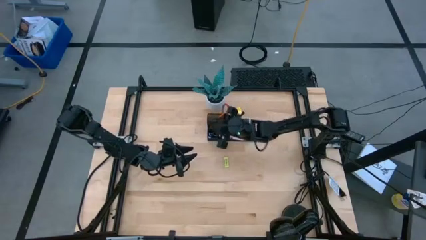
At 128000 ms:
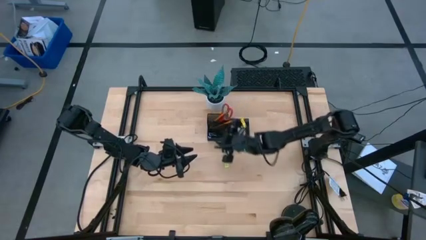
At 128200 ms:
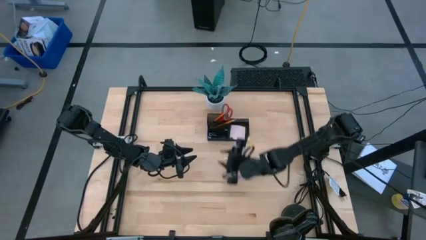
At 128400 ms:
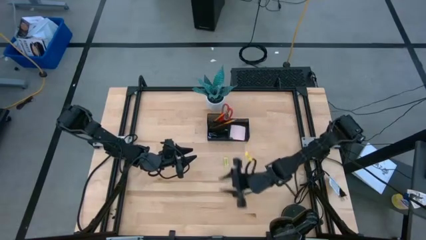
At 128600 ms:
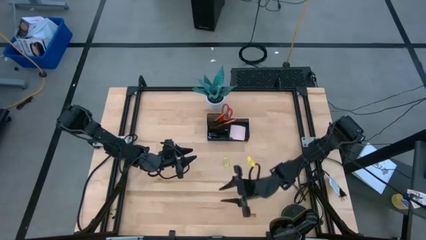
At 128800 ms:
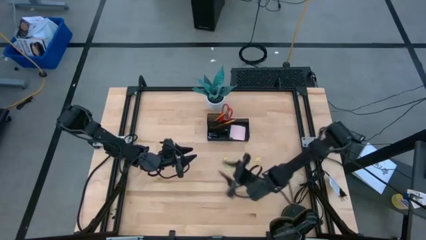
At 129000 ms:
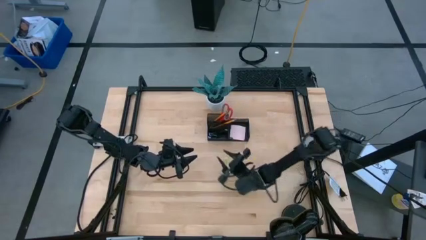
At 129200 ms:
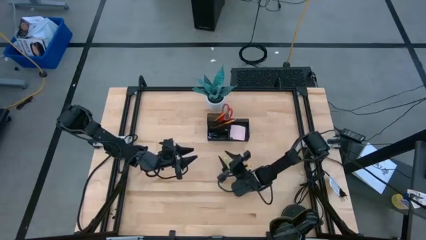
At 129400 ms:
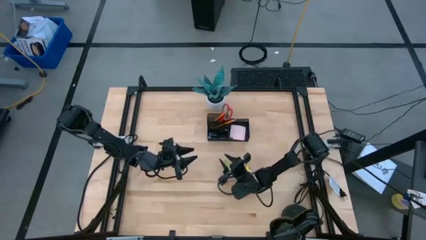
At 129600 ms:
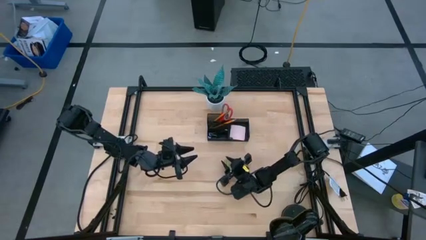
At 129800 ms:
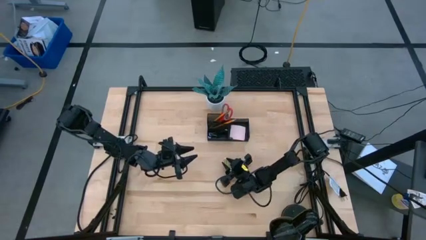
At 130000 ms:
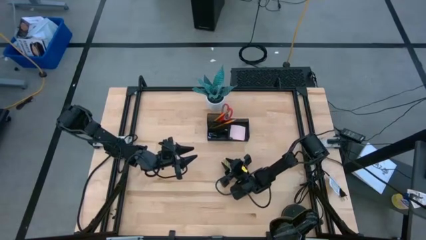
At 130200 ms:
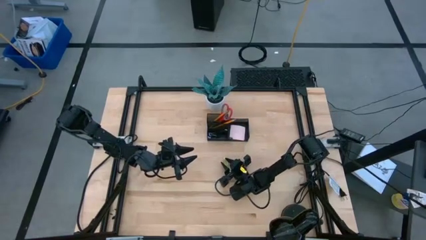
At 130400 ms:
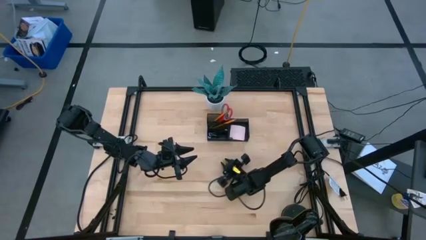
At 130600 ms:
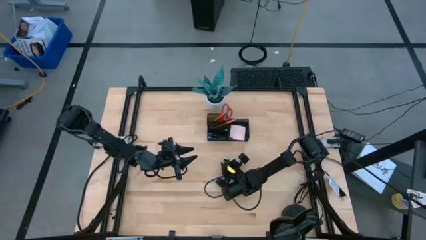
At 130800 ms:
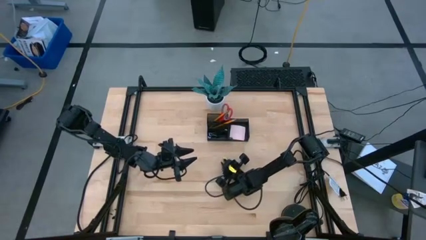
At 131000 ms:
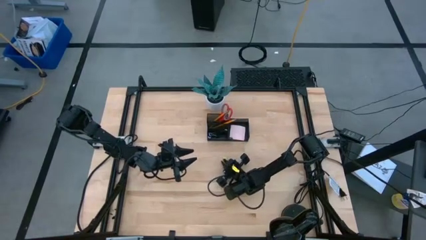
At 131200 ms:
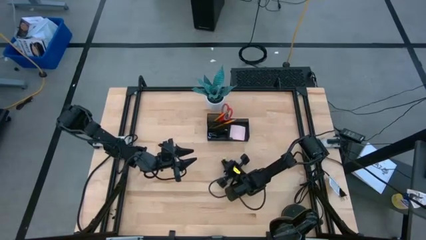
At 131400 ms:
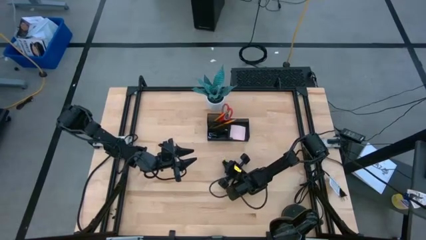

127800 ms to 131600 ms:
Task: Pick and place office supplies into organizer
Put the green eraser into the mesh black desk organizer

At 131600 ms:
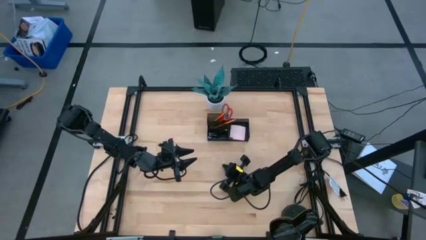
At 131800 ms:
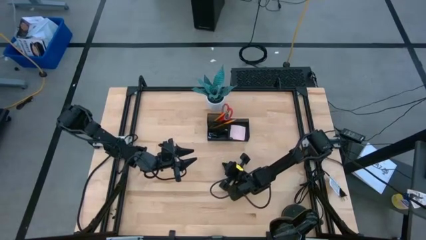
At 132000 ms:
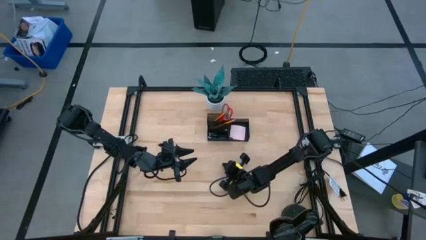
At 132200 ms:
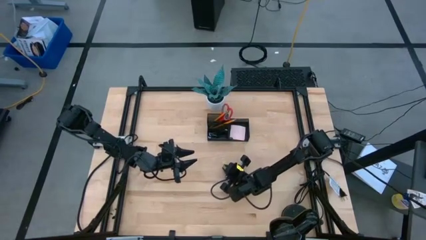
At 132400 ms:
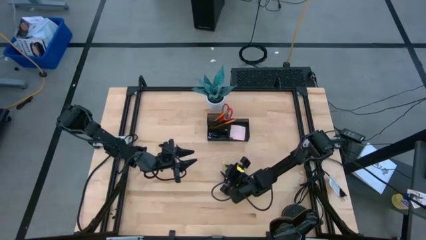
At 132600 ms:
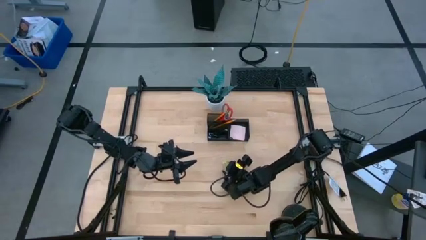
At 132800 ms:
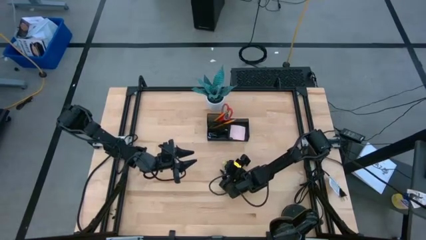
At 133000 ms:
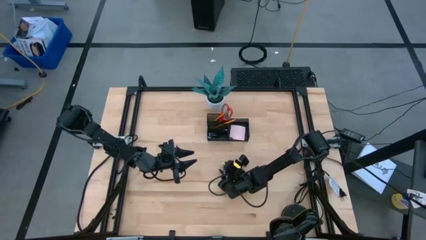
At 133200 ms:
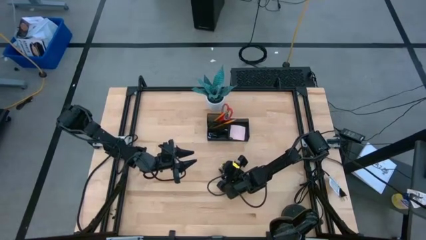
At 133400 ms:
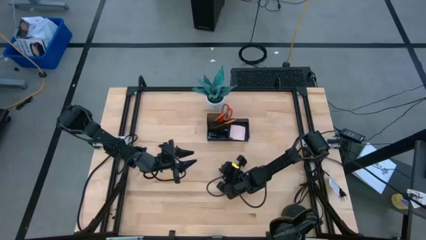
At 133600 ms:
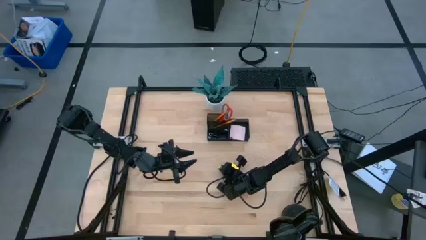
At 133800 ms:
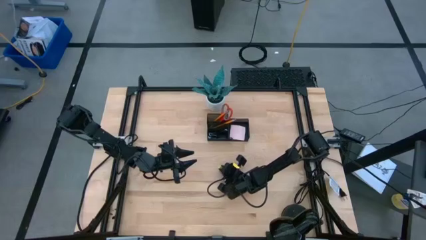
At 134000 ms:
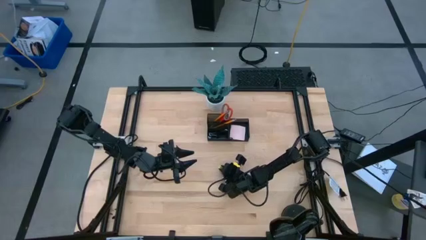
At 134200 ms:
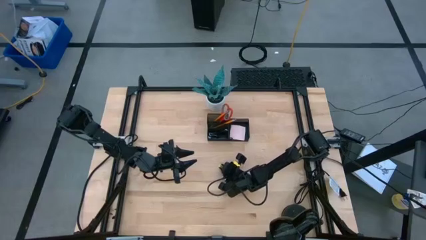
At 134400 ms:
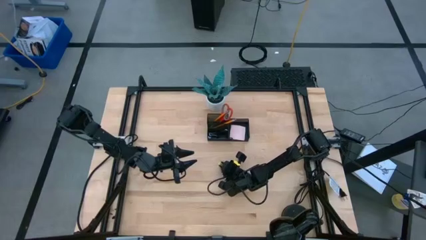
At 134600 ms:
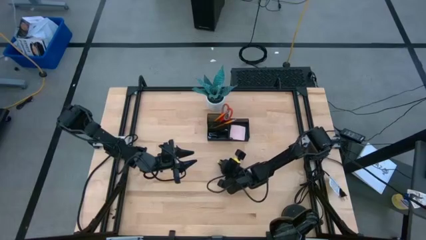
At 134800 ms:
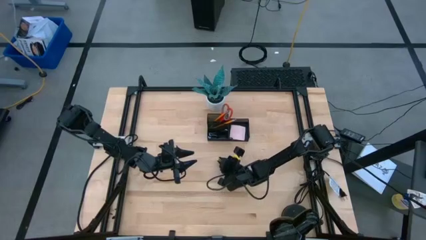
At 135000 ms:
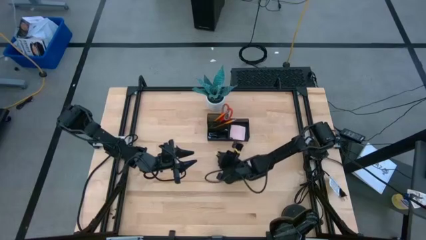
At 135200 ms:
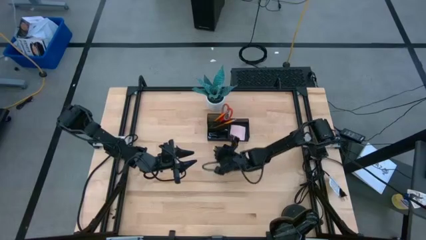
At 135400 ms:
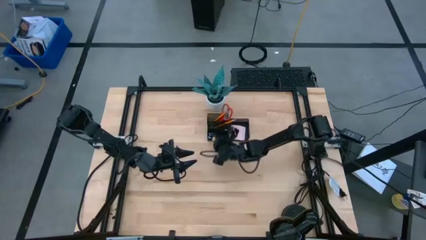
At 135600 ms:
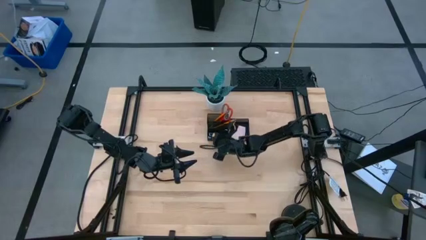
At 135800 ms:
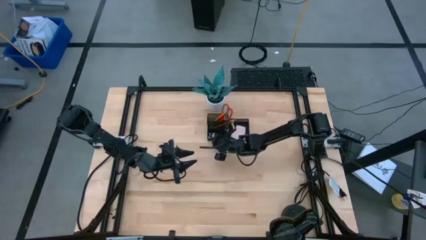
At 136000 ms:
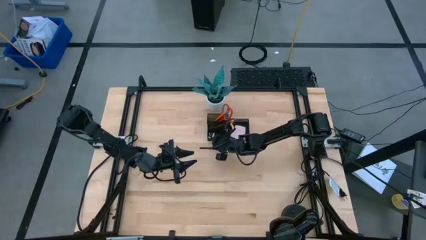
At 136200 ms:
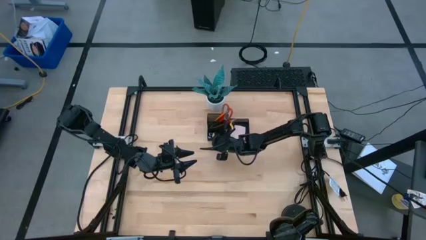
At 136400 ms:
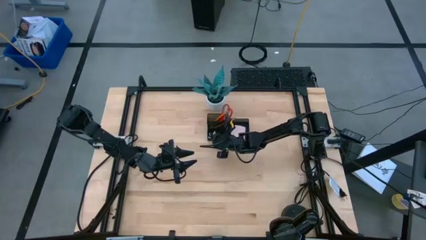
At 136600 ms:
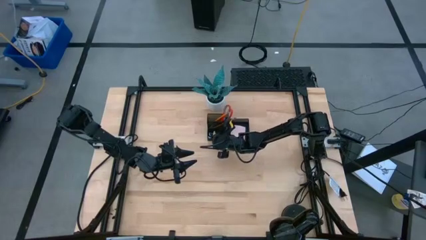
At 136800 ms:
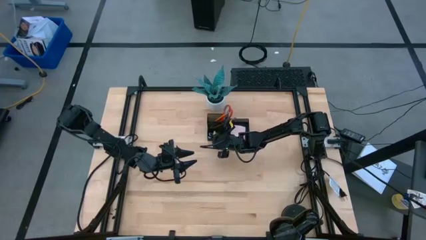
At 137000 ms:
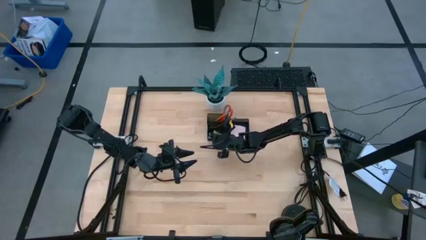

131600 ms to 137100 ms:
Put the green eraser into the black desk organizer

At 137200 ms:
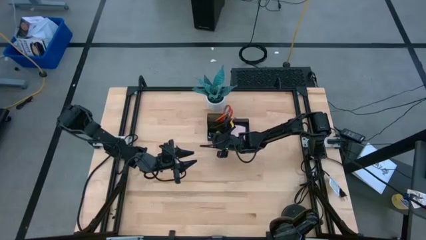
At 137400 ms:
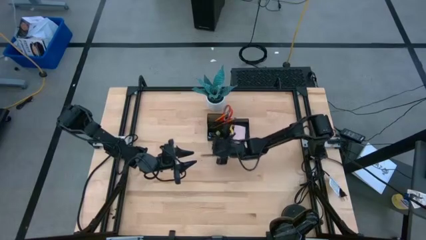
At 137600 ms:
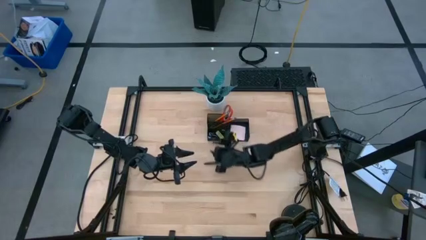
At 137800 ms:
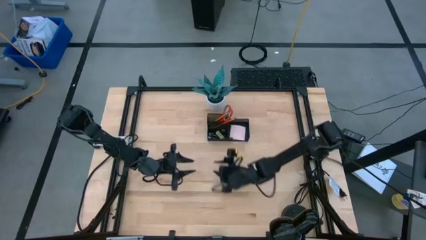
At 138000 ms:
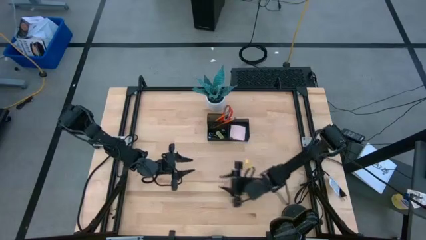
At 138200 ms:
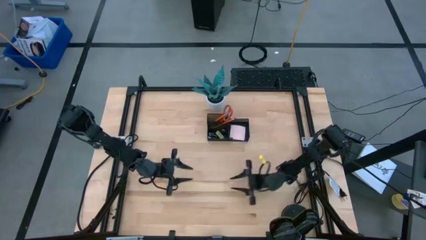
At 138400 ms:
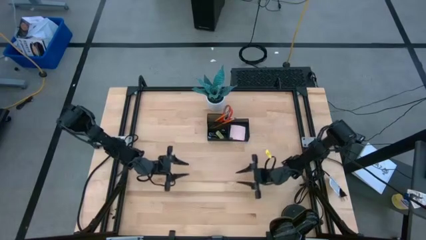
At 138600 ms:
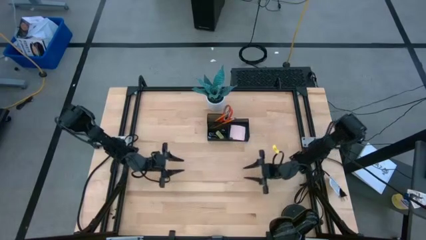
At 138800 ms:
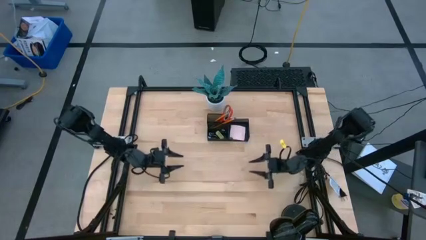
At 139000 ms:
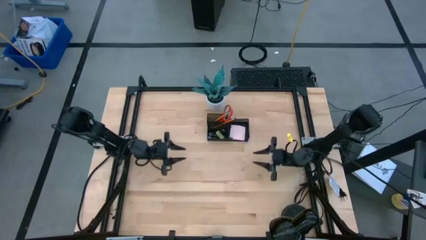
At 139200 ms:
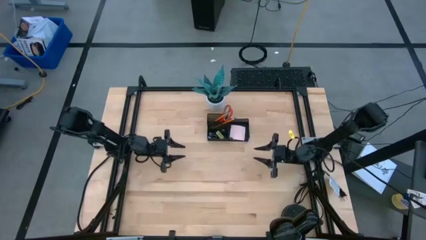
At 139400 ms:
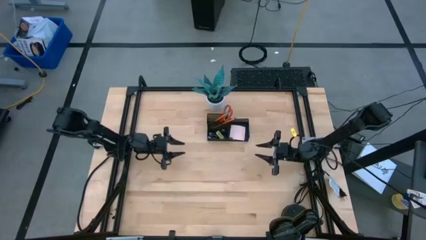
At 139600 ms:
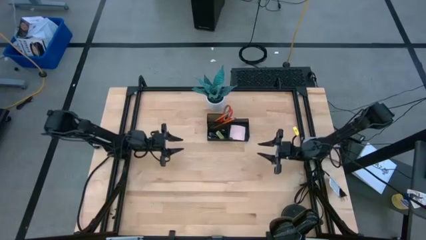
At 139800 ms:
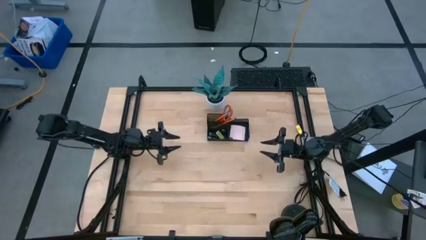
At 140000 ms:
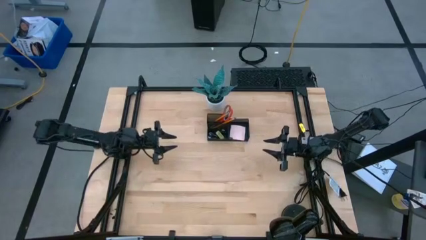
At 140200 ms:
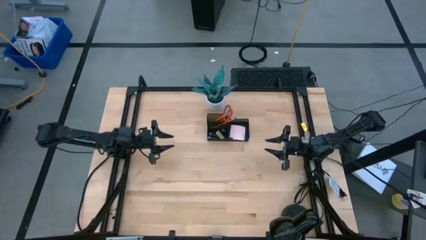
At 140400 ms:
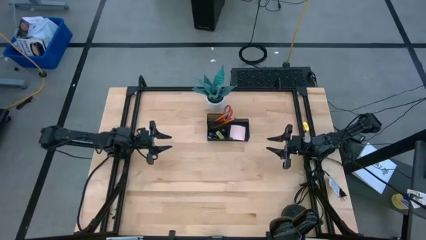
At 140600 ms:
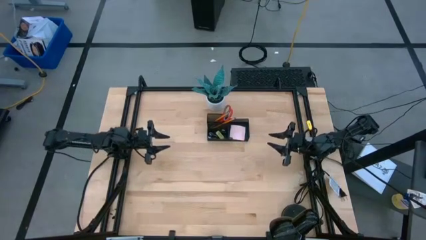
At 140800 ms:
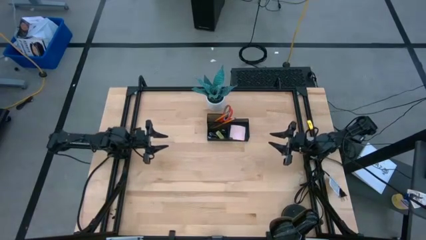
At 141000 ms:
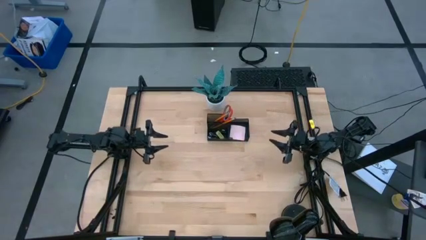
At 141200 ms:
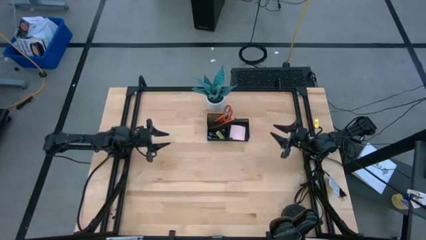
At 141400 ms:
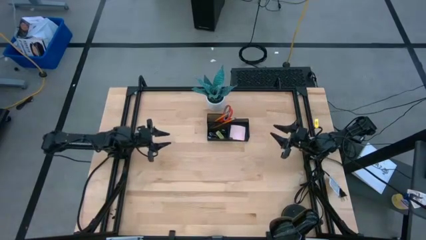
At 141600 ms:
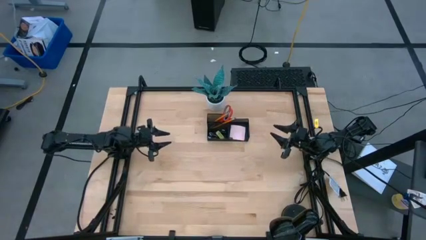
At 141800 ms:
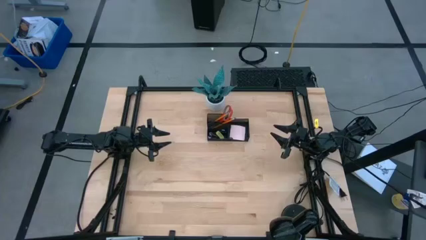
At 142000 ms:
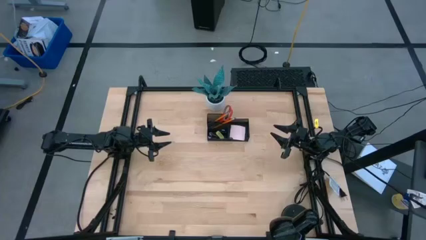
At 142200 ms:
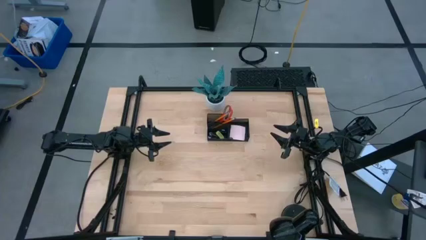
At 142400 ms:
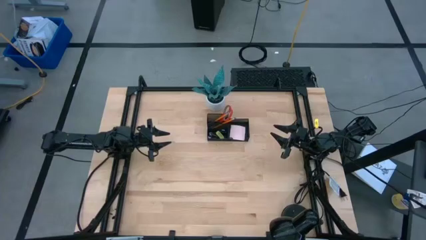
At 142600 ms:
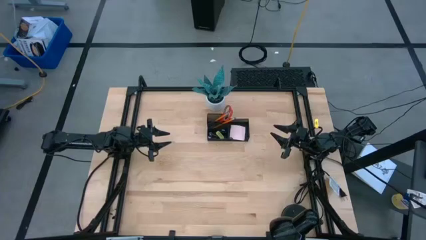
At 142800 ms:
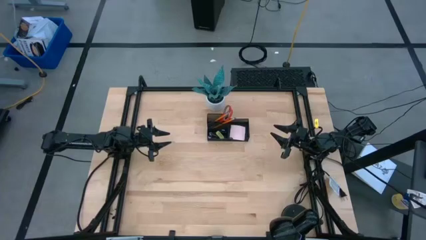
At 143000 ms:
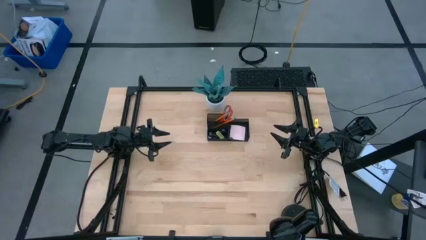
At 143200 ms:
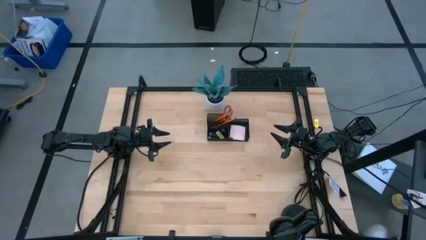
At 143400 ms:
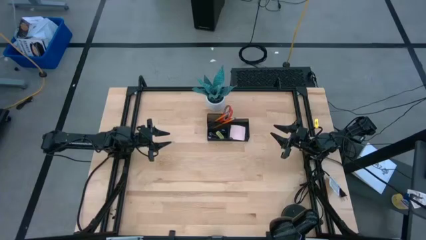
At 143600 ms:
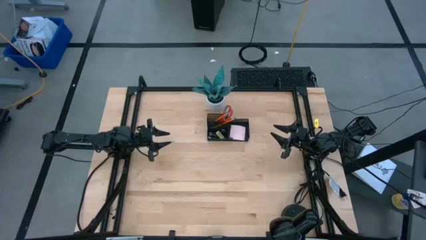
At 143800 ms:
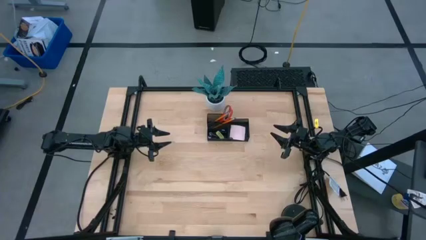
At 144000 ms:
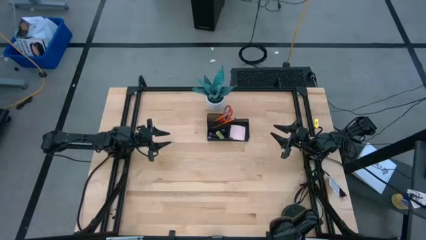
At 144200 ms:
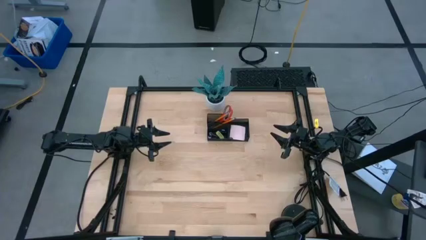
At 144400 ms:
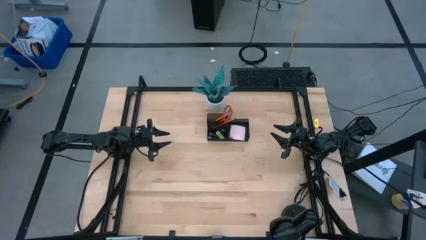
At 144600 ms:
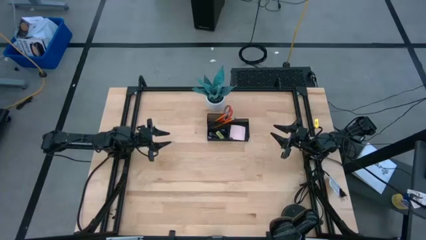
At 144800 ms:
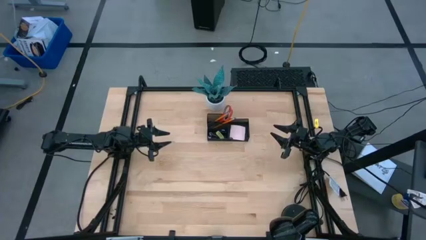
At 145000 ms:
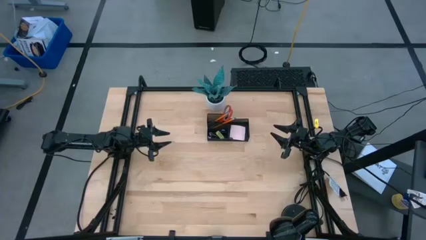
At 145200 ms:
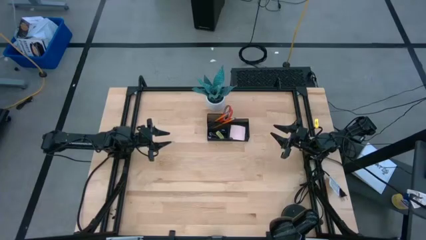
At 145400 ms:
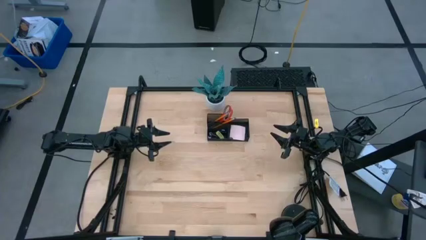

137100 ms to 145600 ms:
Return to Home Position
